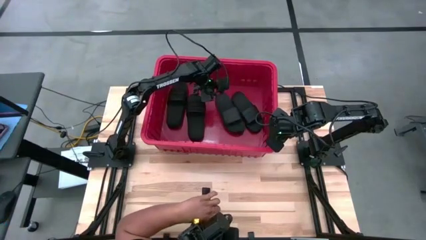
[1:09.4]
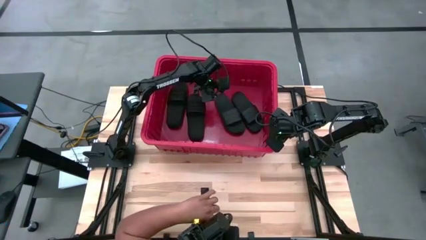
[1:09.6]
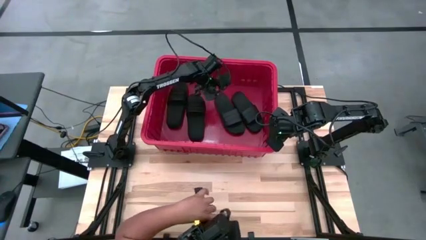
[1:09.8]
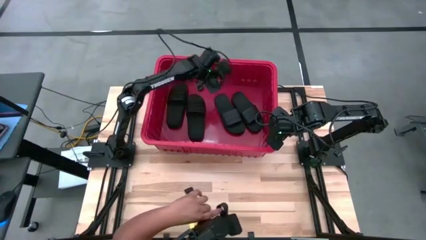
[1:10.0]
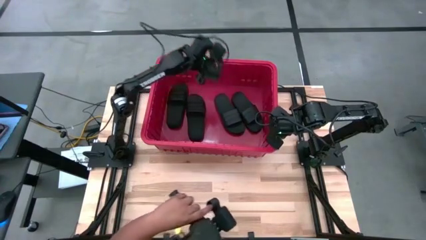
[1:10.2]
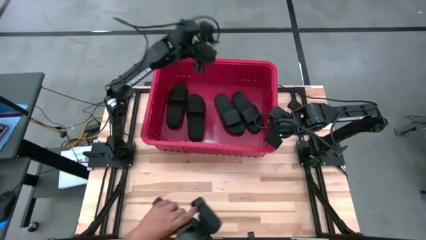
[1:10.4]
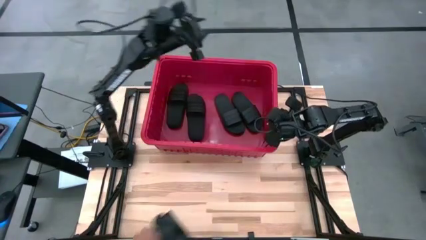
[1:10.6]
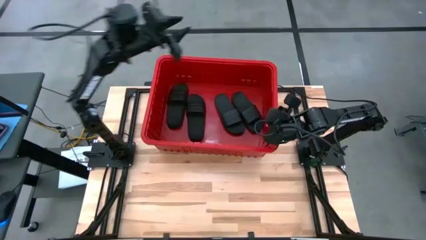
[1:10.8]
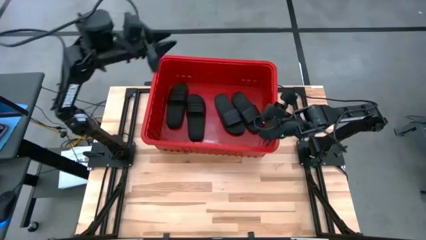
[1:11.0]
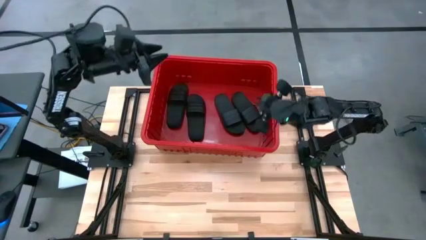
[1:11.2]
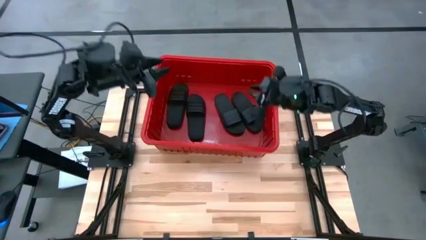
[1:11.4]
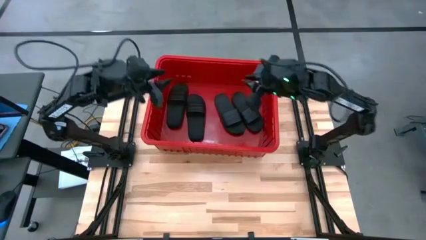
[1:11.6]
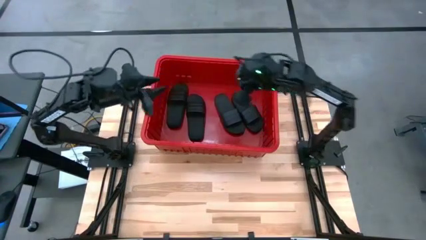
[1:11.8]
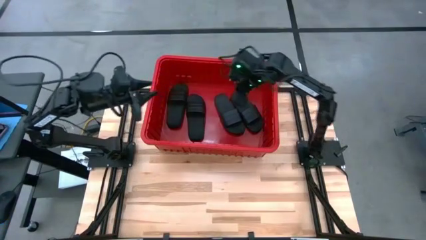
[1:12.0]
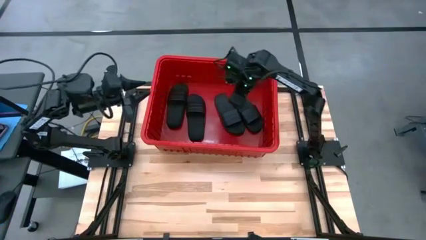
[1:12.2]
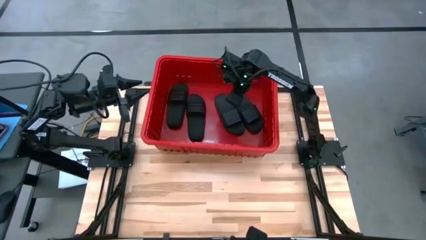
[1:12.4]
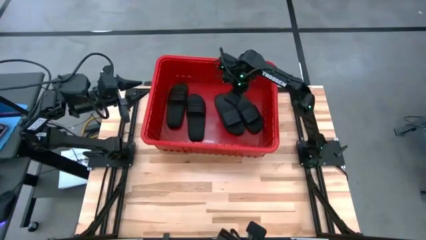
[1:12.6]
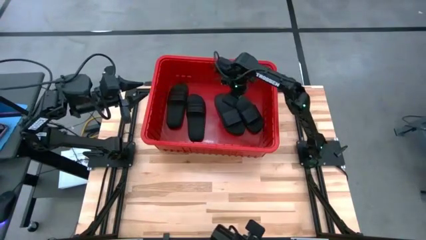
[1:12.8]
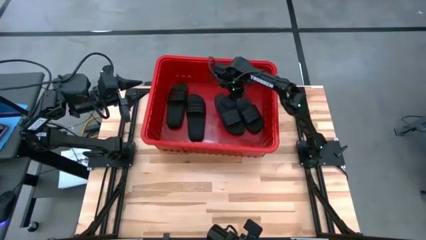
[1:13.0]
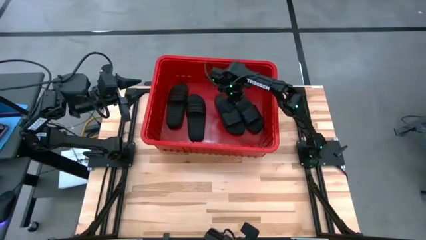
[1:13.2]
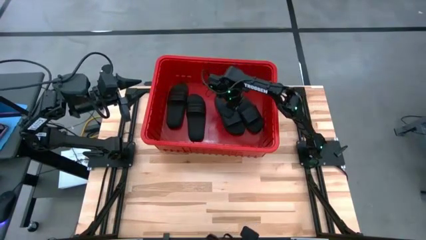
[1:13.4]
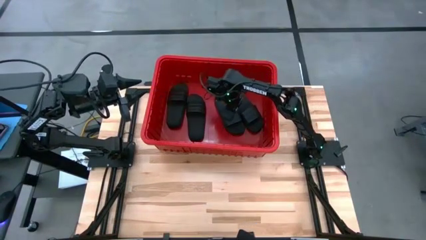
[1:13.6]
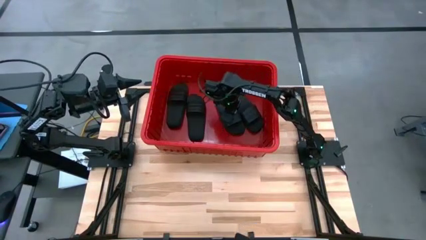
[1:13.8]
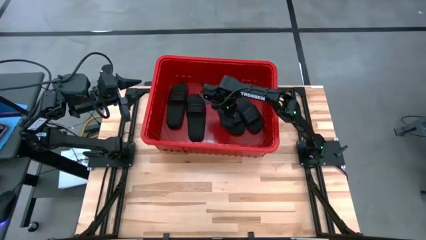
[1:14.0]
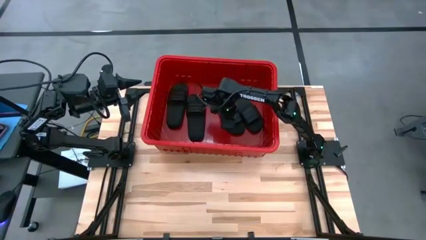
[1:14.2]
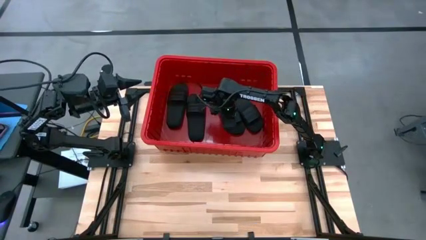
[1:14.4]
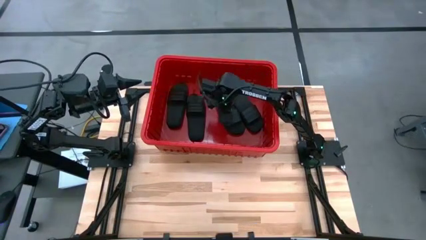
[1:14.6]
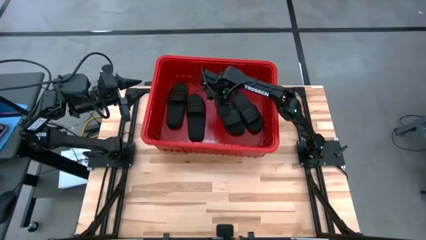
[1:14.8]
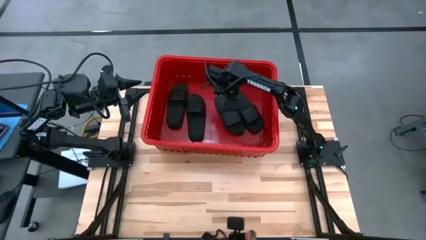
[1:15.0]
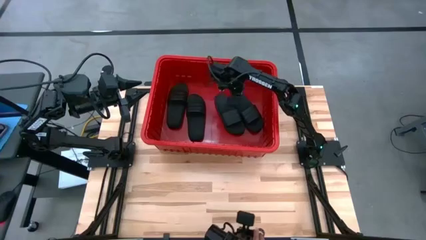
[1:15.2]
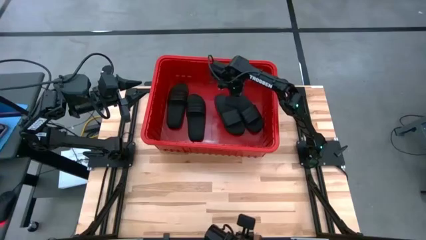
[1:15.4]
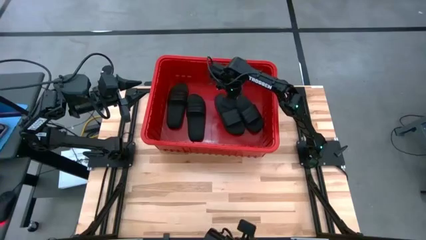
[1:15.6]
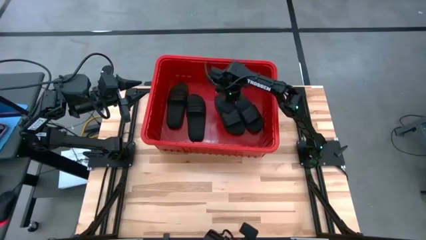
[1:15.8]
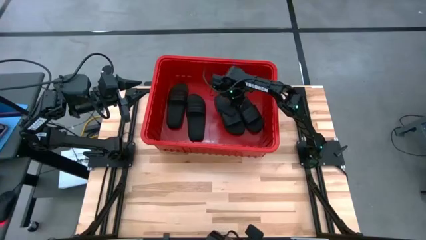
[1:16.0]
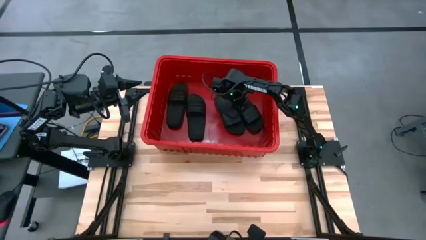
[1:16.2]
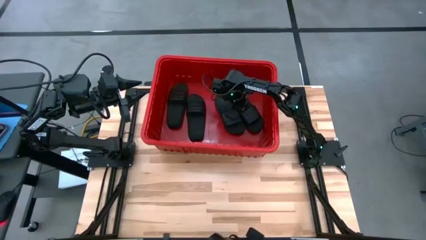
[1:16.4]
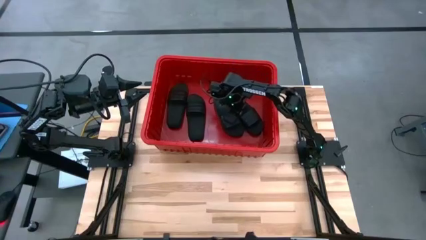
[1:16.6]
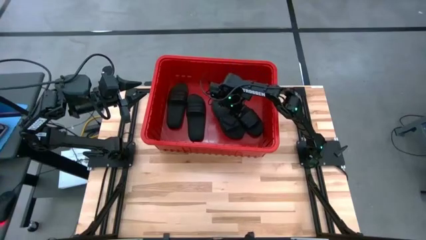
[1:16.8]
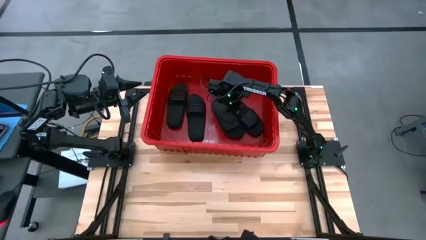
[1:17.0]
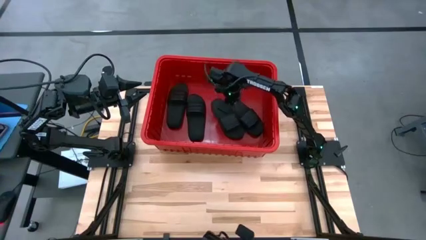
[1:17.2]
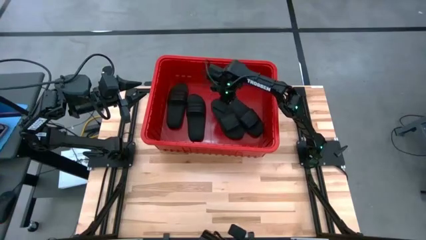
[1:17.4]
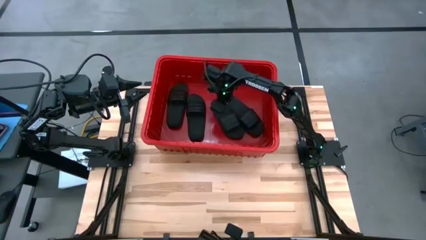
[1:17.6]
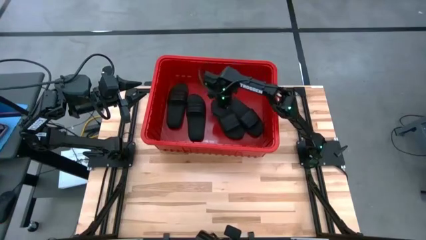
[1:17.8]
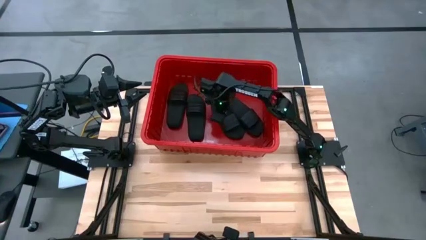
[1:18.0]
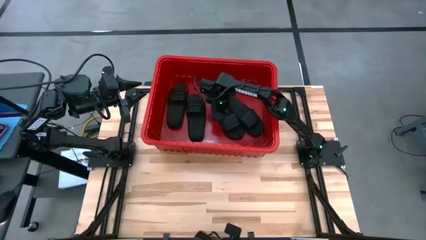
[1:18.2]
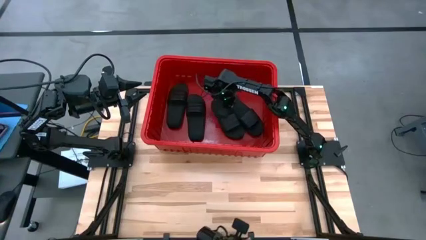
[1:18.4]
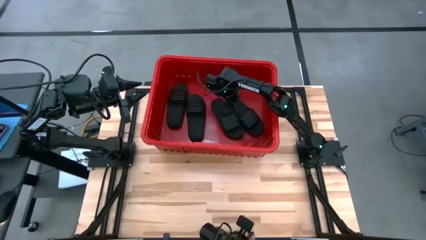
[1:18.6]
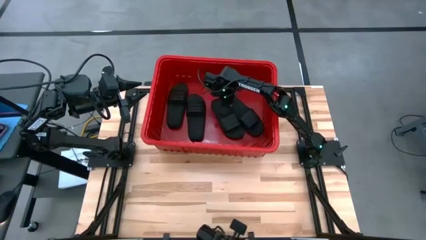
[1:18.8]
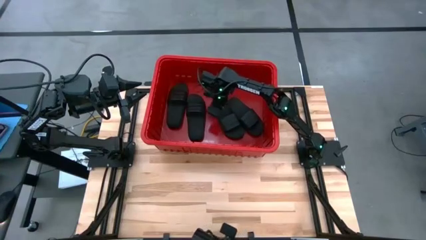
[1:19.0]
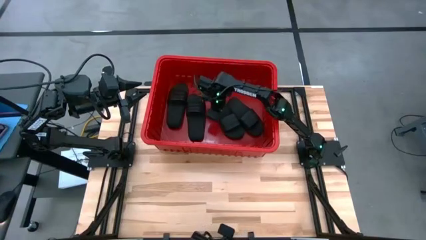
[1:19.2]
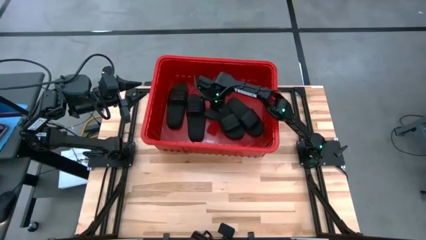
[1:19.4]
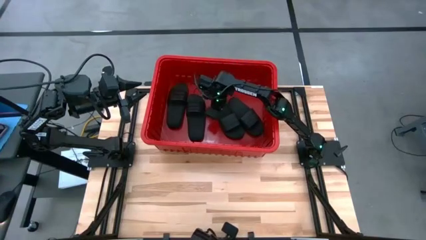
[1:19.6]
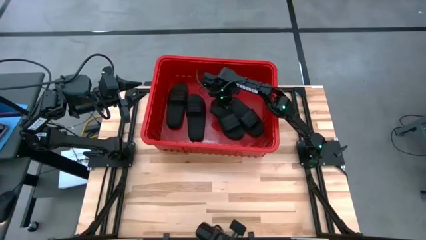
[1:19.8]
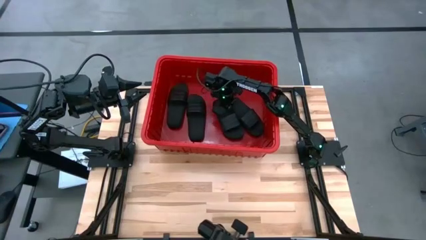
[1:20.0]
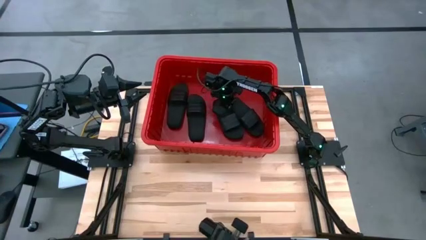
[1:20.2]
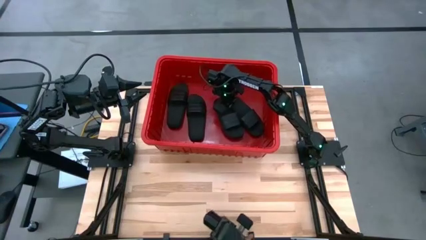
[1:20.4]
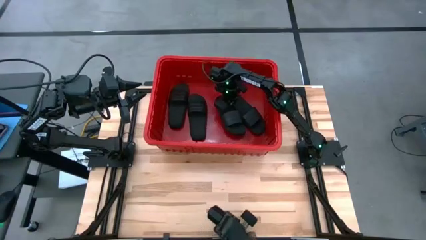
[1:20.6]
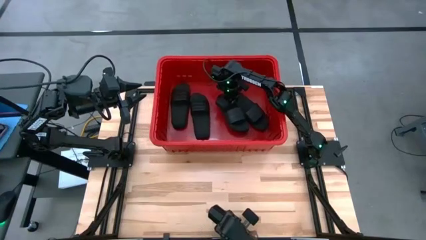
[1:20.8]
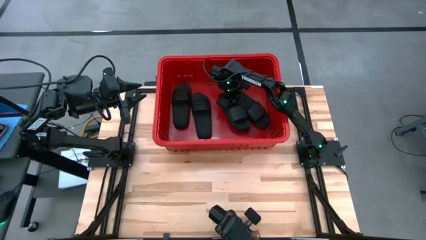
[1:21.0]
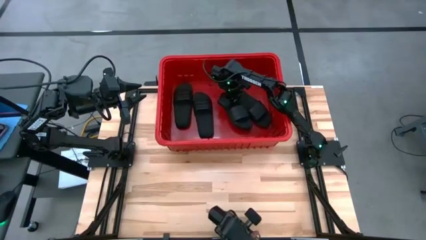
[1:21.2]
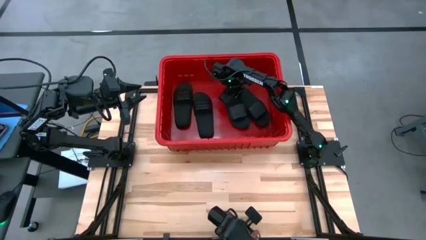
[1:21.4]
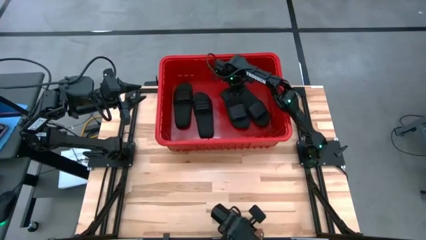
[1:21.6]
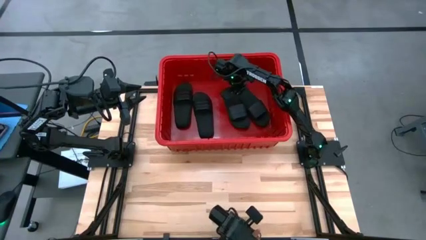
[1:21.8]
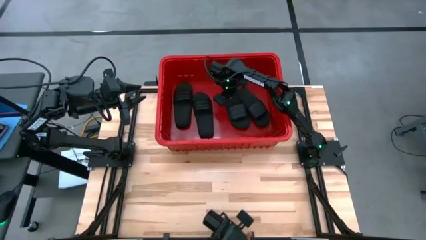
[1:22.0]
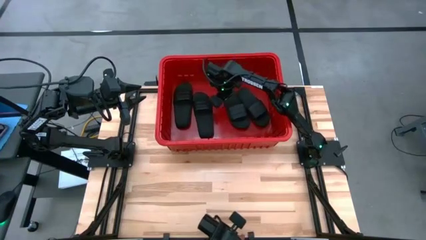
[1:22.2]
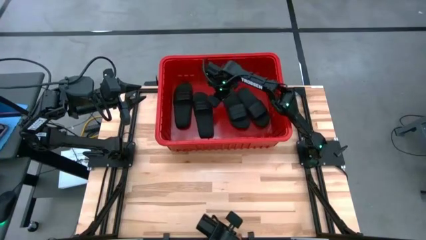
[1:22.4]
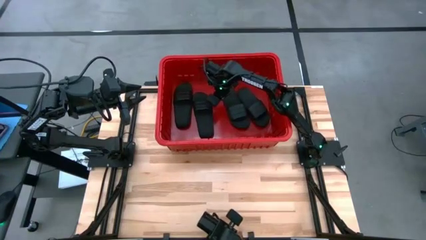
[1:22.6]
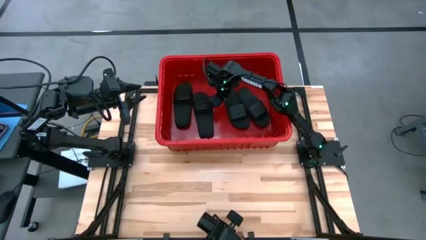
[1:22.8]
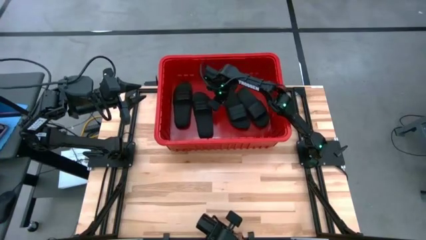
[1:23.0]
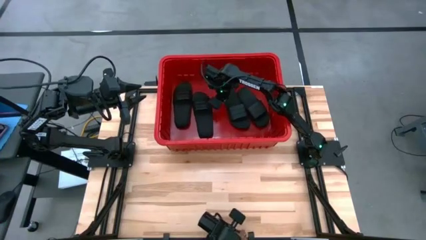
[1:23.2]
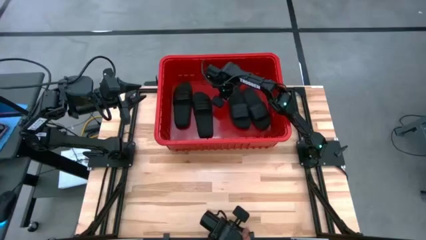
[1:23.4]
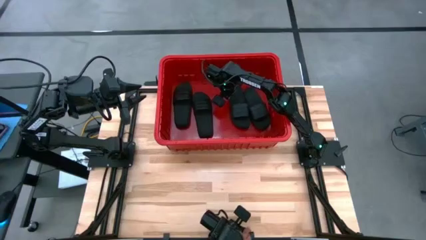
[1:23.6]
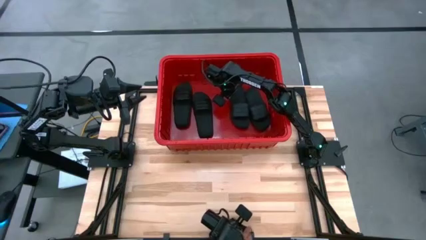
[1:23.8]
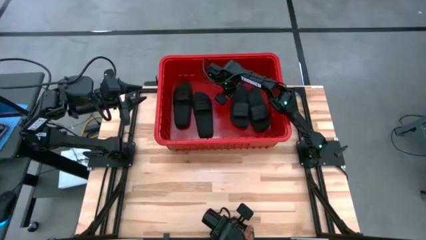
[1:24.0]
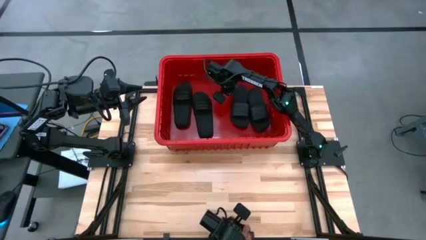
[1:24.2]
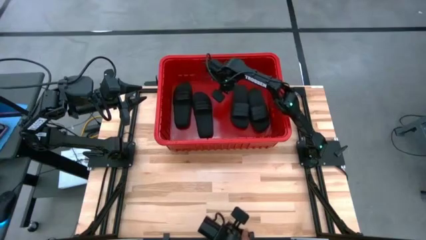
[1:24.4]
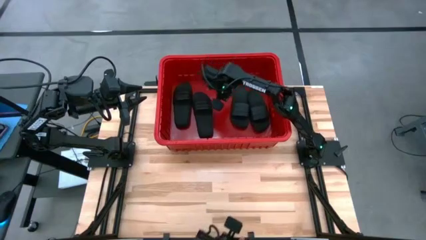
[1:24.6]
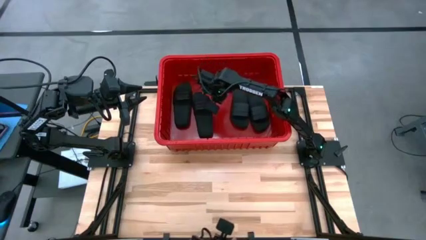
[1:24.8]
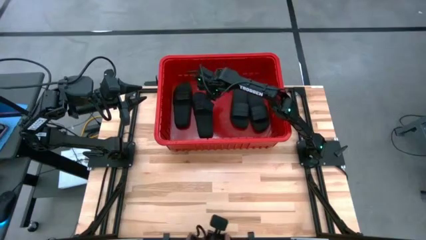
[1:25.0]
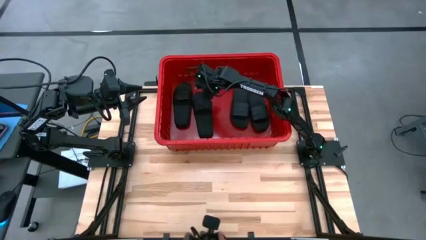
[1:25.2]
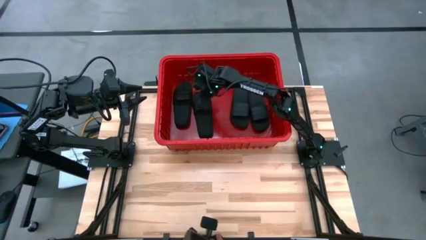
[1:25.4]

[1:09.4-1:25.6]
Task: Pick and place slides into bin
Adjust the black slides in the red organizer bin
